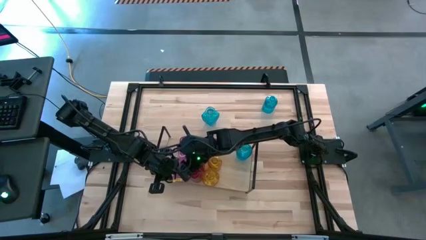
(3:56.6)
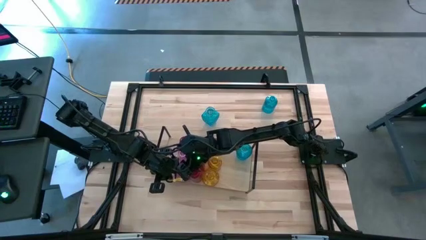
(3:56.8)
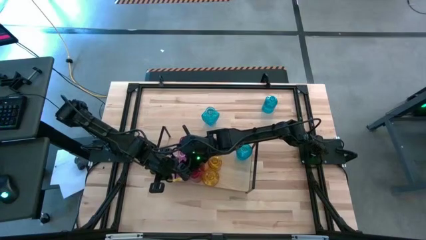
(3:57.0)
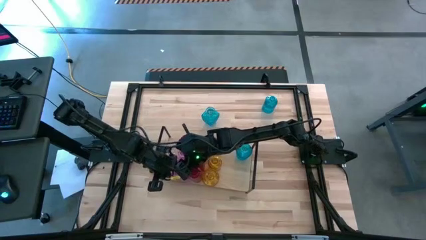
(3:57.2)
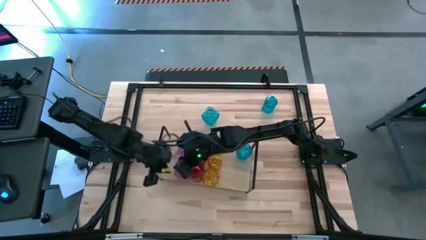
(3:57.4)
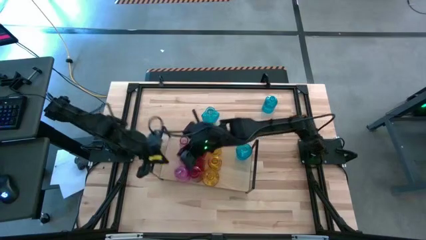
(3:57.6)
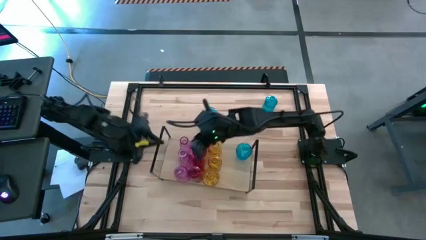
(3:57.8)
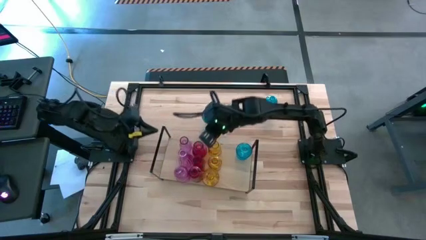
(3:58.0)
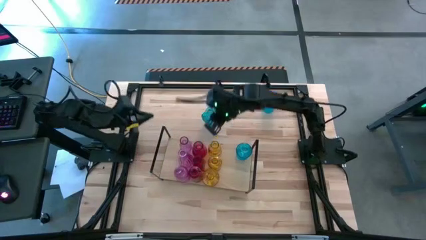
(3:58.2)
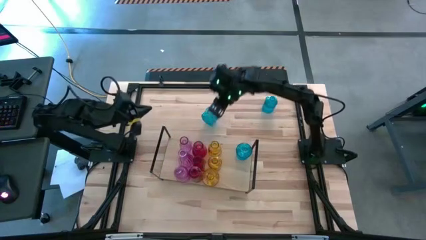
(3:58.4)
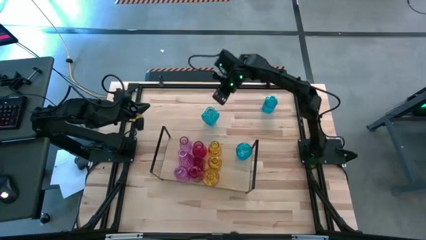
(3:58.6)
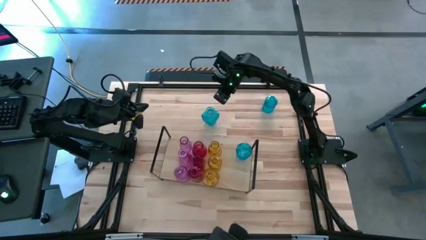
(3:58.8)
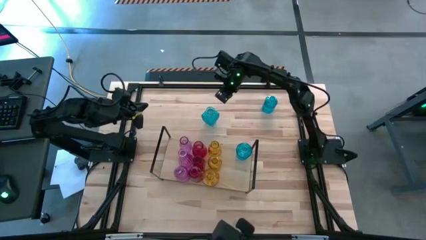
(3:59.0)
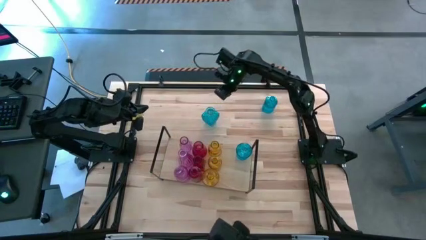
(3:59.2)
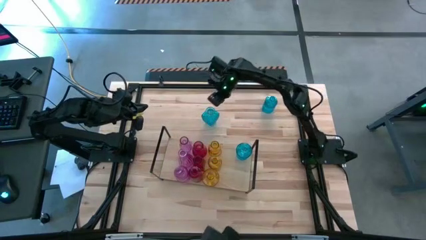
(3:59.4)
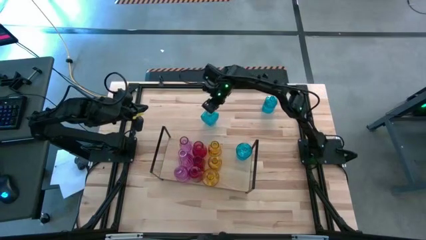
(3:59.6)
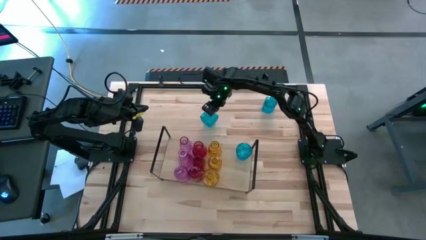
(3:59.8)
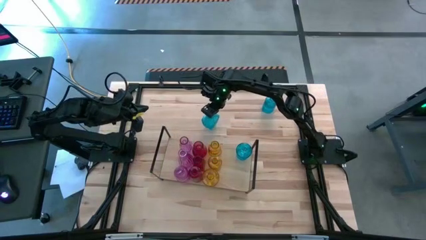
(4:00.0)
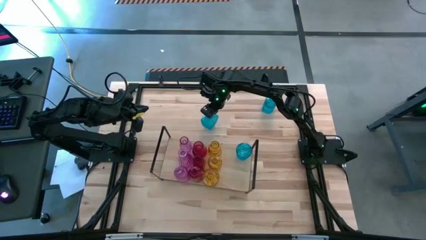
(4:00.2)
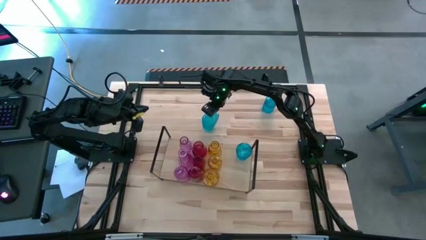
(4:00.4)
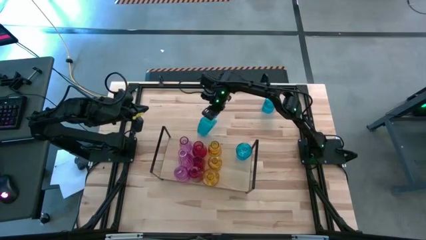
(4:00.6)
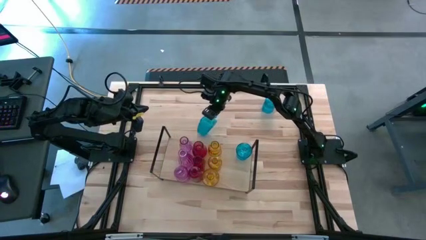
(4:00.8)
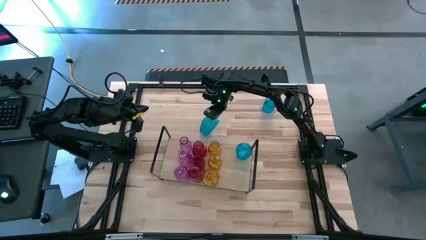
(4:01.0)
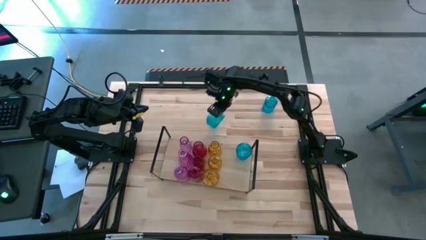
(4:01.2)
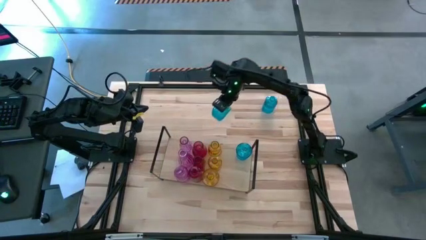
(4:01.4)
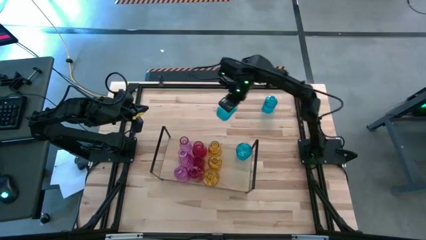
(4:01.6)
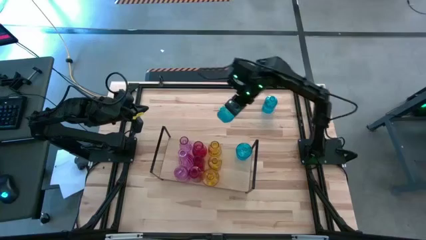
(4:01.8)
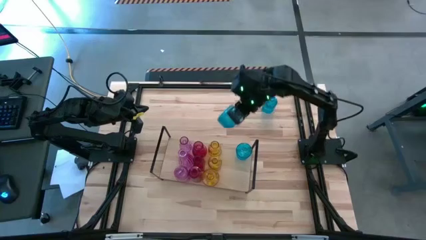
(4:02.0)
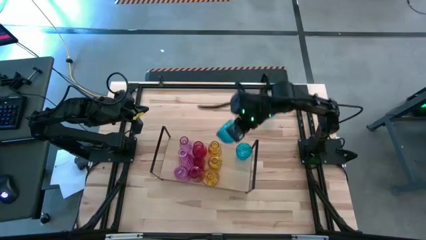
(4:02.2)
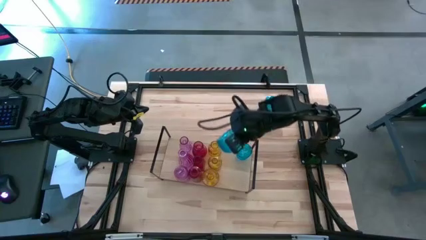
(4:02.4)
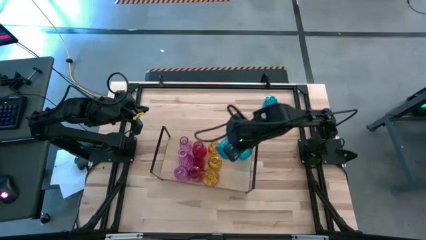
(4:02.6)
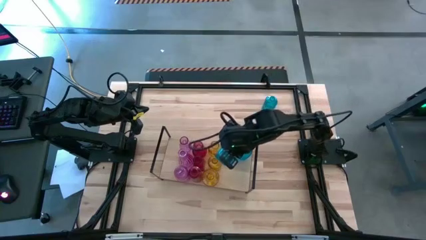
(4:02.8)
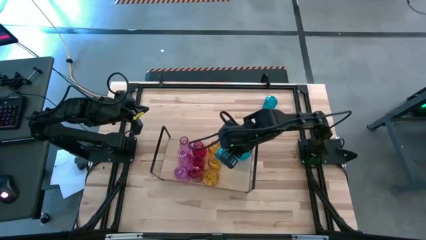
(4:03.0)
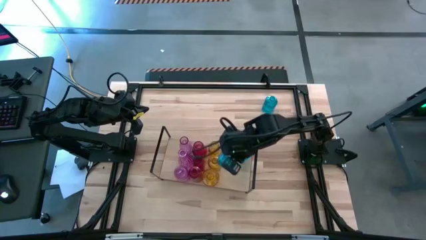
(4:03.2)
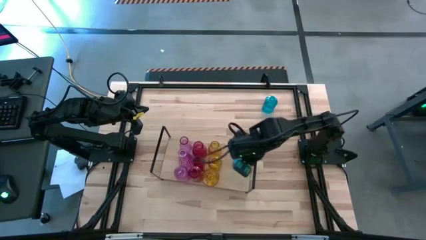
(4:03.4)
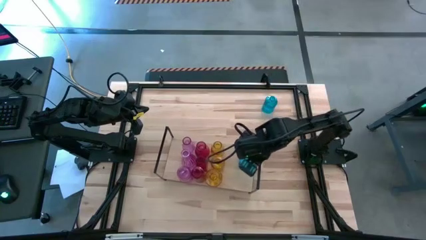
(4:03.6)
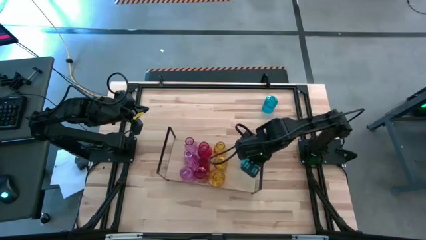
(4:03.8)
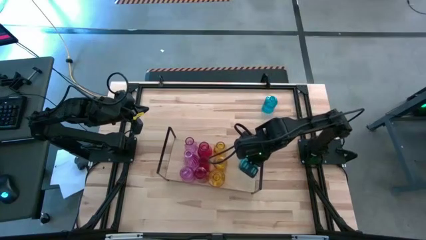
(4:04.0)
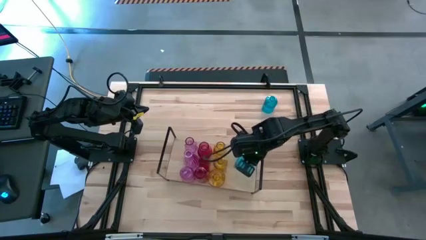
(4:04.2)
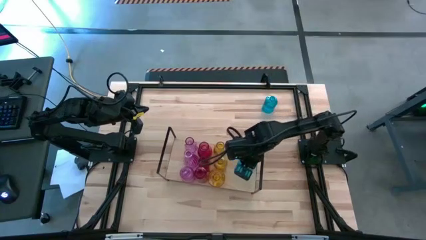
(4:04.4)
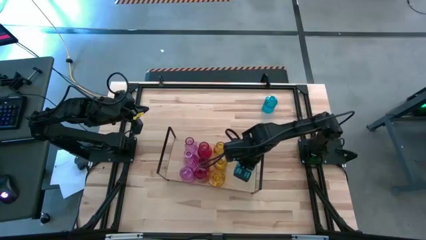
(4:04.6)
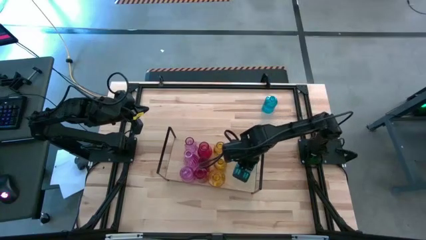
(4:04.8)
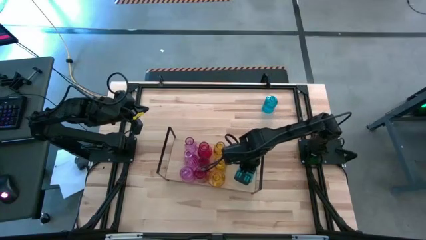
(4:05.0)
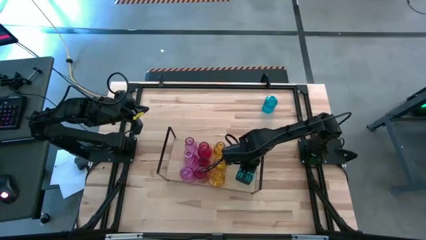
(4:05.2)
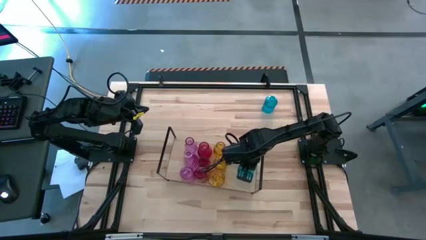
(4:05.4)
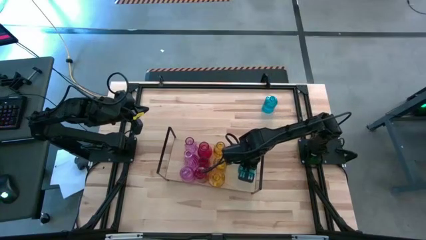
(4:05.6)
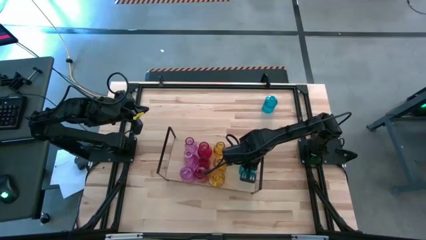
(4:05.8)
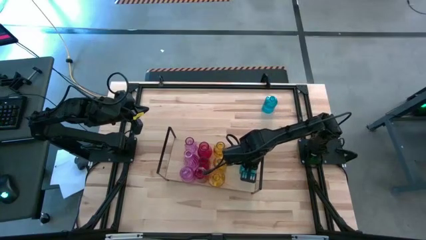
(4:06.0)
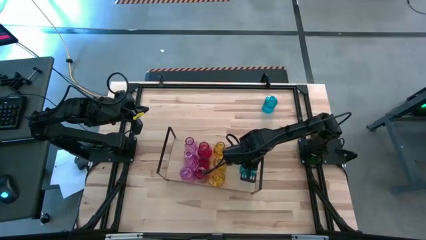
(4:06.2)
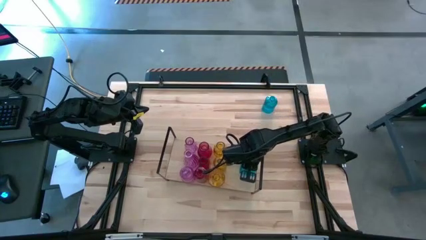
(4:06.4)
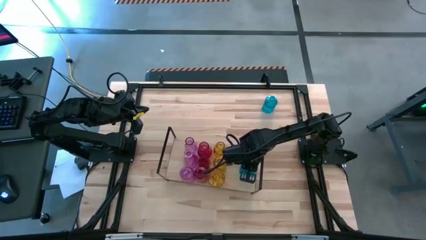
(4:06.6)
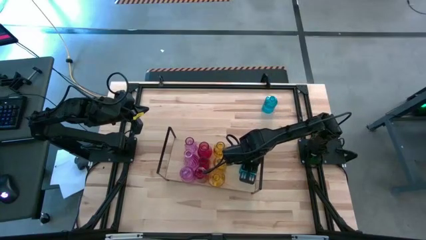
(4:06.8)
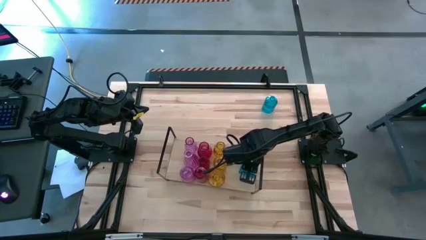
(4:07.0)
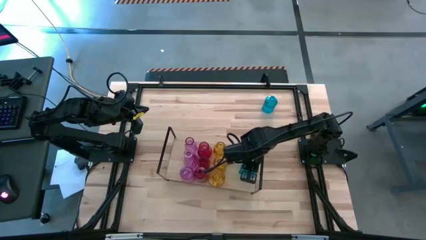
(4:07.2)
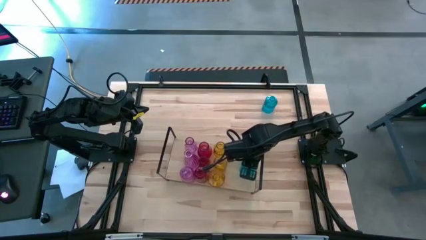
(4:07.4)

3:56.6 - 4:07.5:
Task: sort vases onto shelf
Put the bottom blue vase on the shelf aligned with the other blue vase

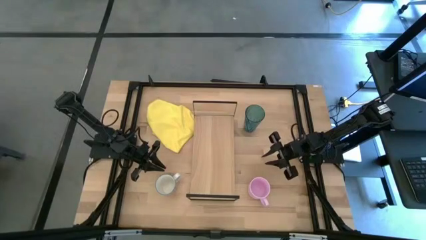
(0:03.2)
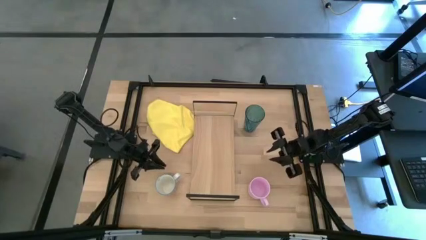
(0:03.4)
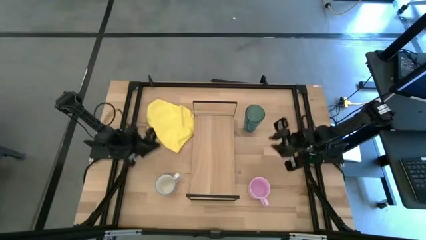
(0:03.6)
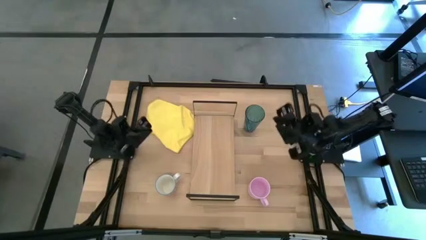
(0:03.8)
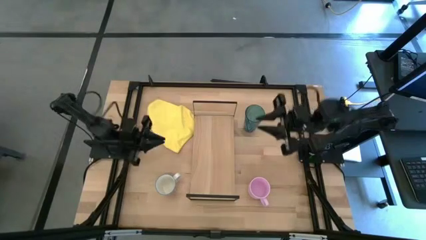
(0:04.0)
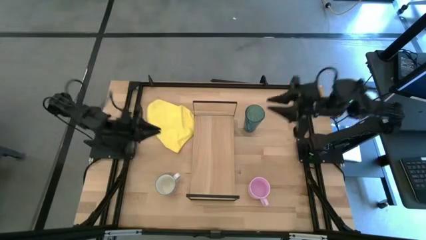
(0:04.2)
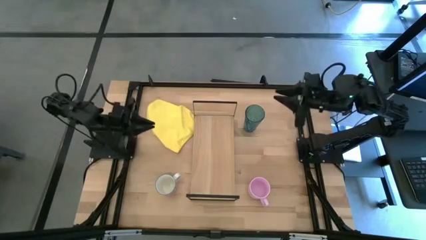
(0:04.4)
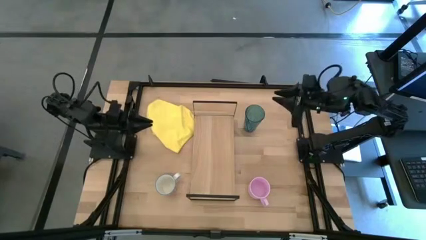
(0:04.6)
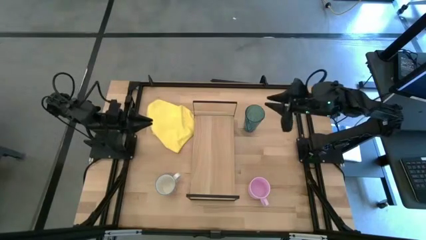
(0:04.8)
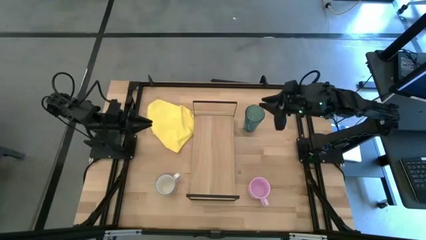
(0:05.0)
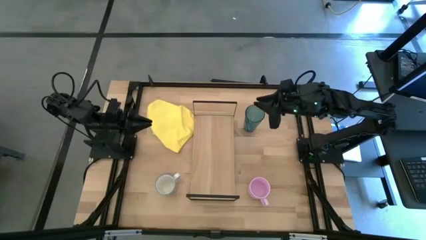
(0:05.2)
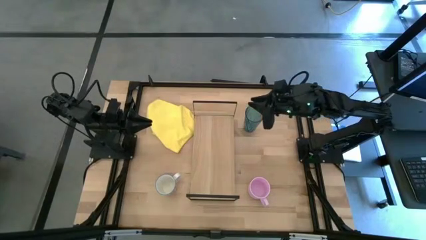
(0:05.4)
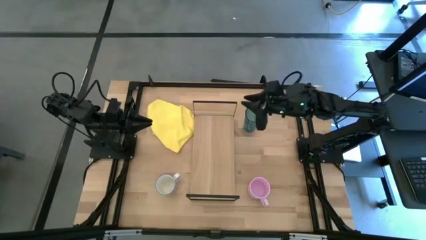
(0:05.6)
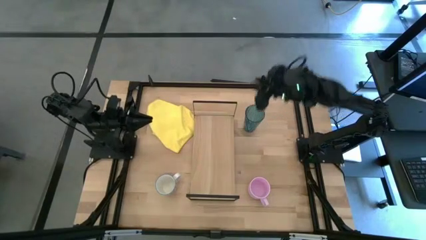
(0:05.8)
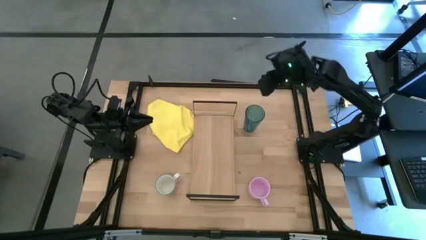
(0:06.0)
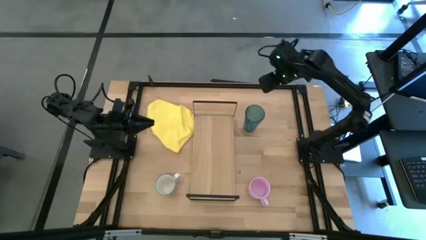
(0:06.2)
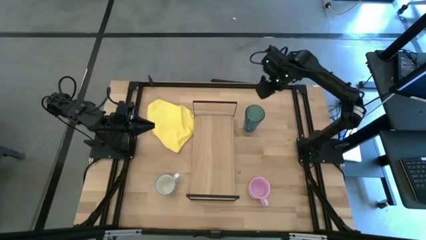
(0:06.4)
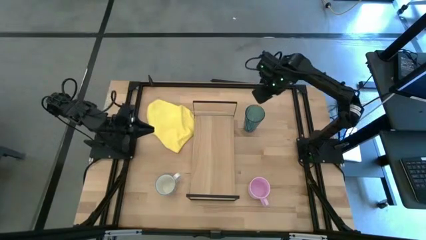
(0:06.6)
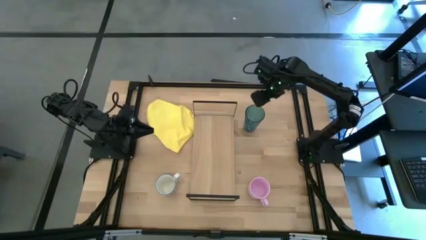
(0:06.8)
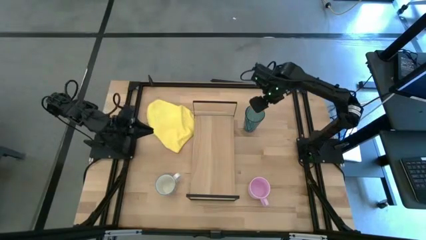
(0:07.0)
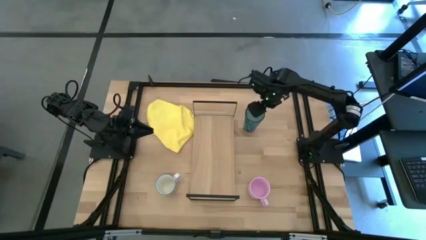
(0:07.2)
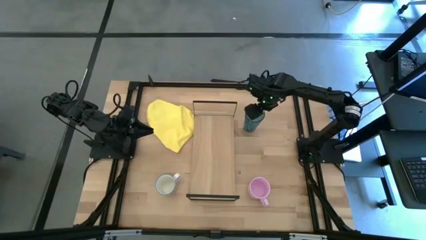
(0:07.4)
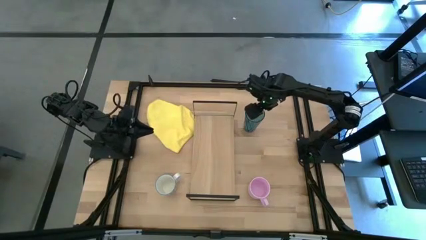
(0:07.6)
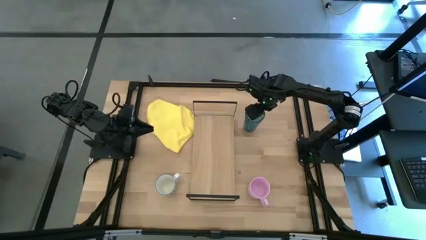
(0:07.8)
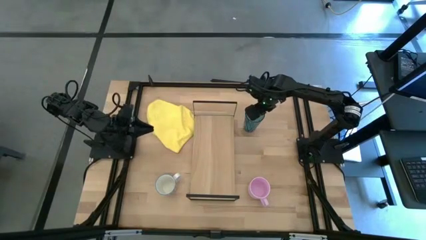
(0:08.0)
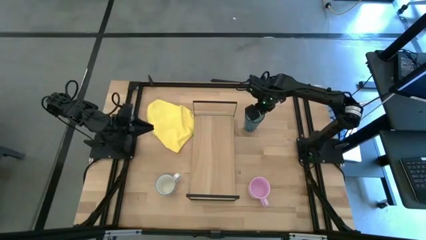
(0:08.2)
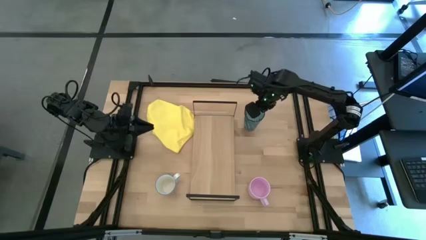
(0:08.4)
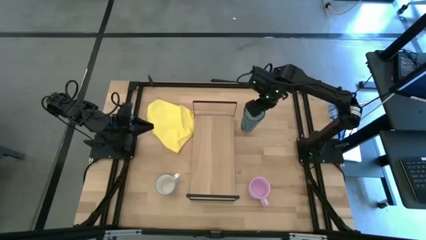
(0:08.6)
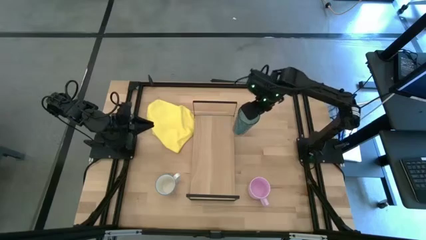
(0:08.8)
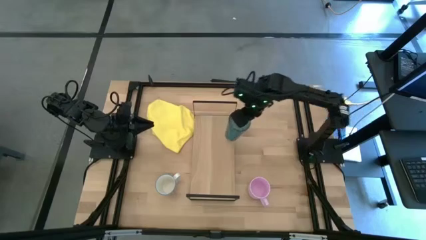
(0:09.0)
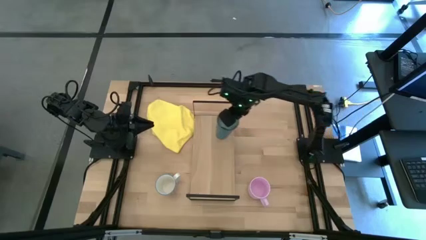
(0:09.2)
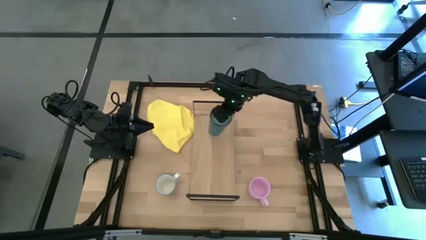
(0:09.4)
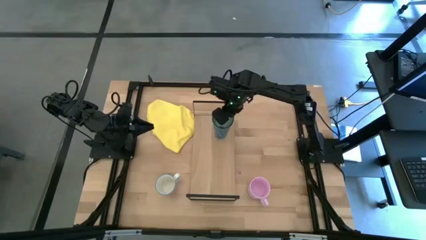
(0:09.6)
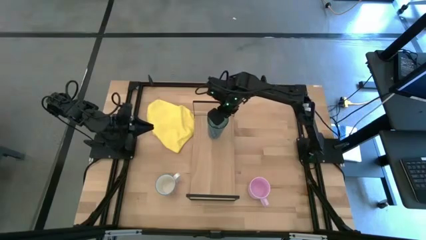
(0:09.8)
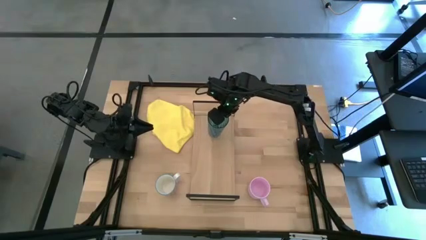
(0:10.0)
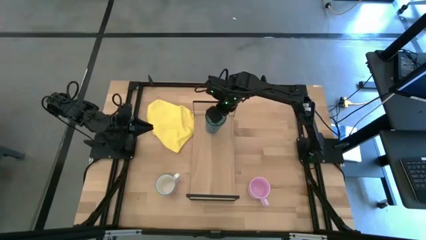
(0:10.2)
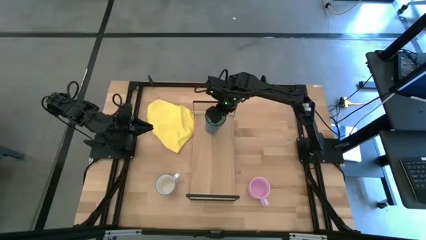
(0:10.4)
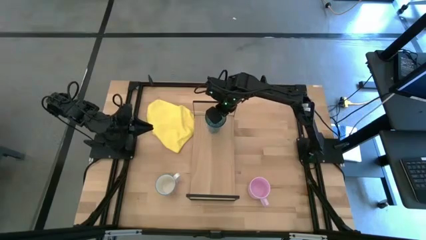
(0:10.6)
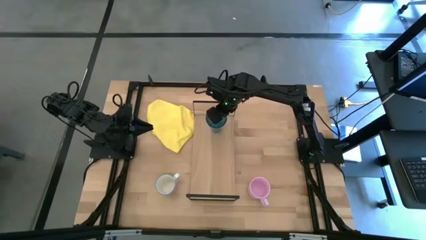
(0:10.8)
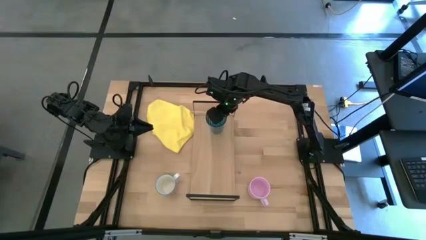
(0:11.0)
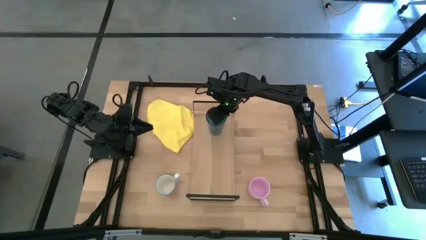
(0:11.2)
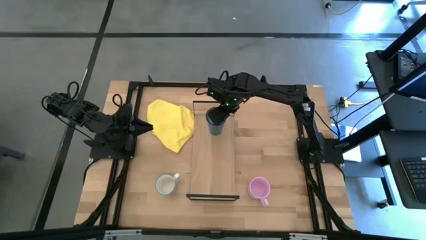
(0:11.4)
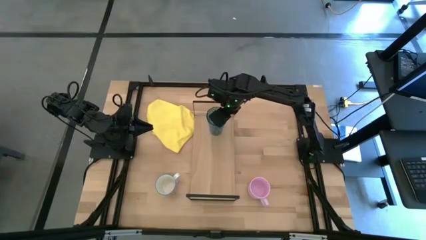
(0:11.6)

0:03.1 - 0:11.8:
Task: Stack small to large cups/mugs on shelf
Put the blue cup on the shelf
